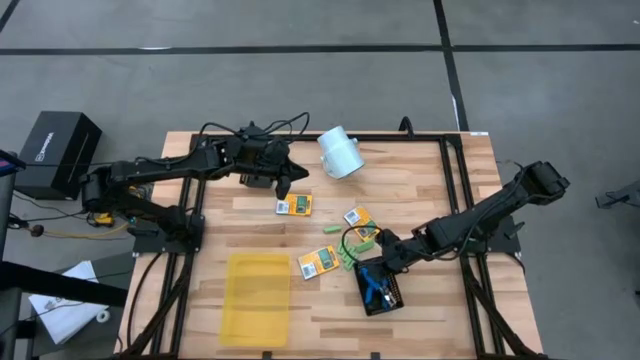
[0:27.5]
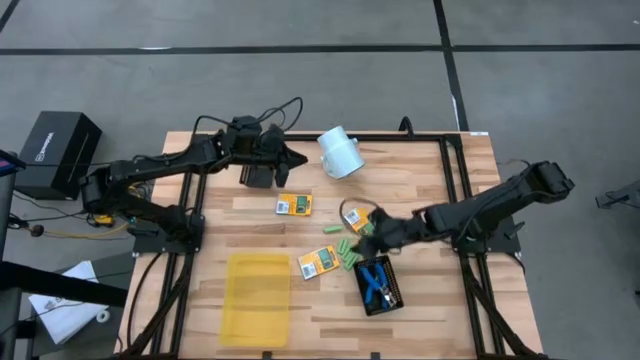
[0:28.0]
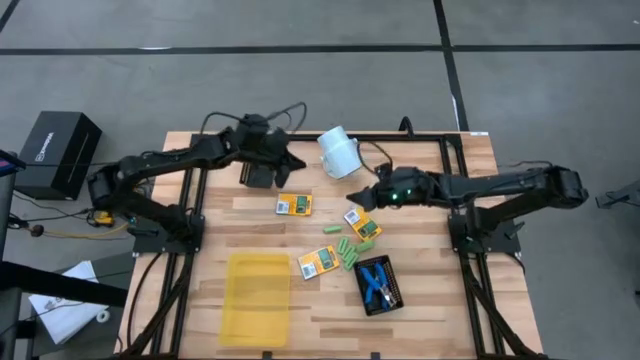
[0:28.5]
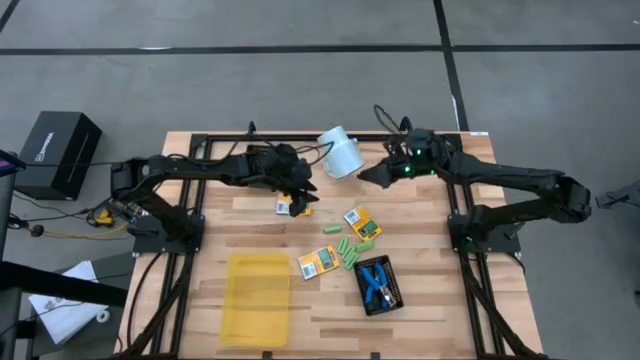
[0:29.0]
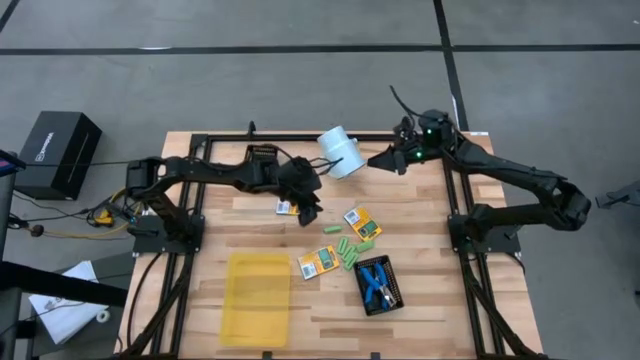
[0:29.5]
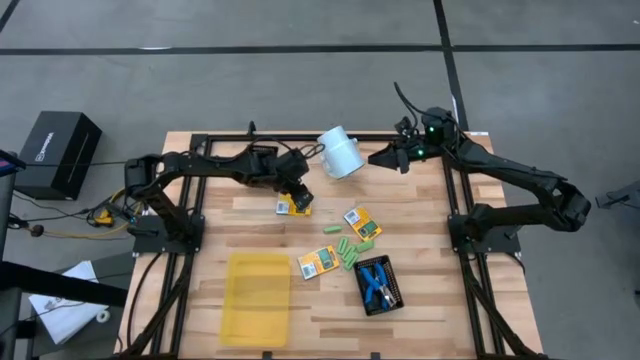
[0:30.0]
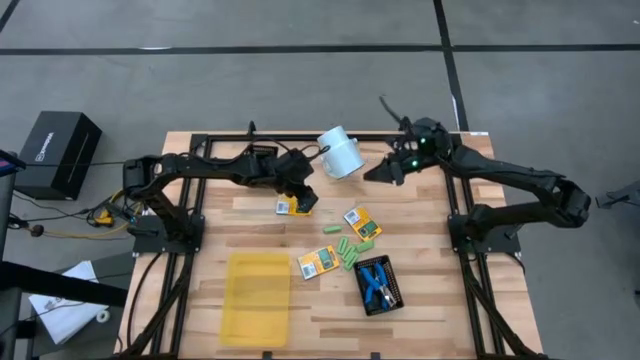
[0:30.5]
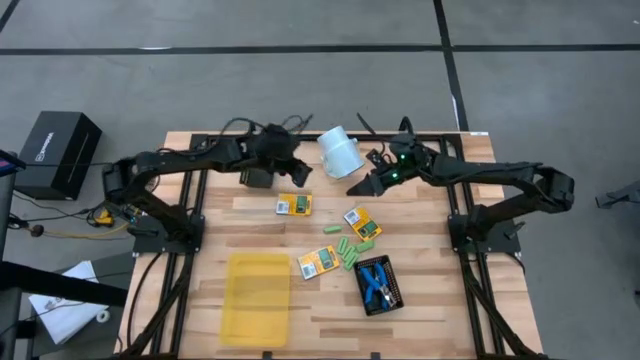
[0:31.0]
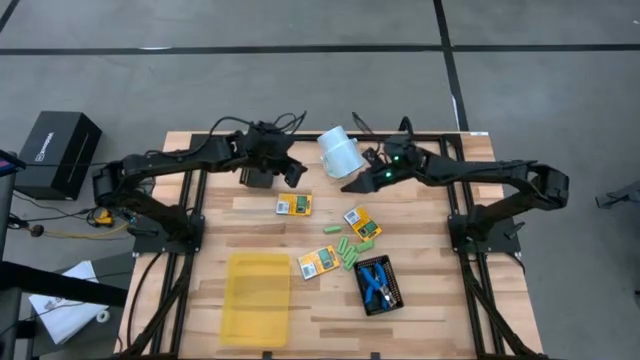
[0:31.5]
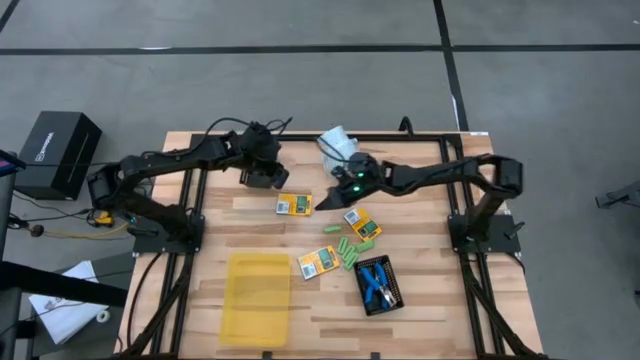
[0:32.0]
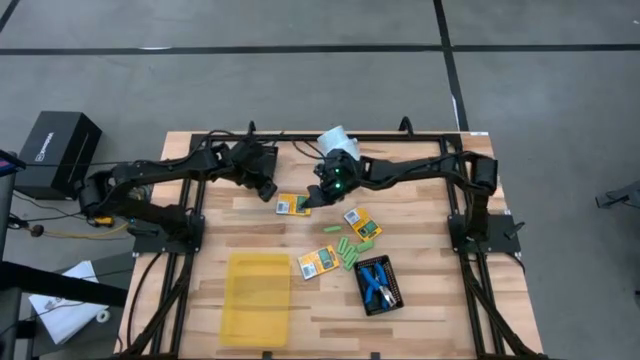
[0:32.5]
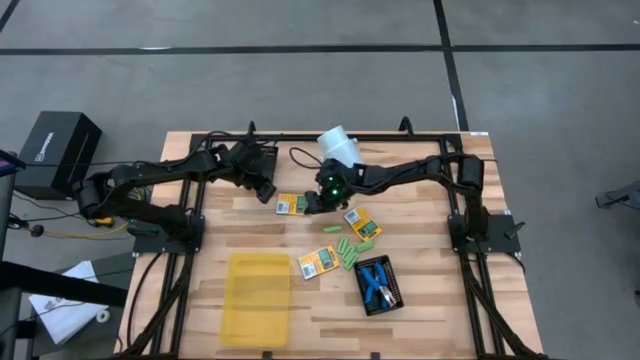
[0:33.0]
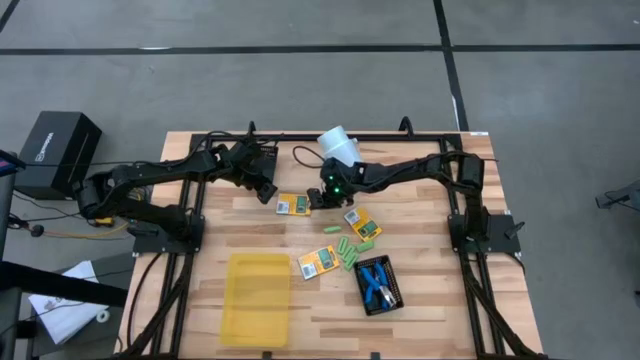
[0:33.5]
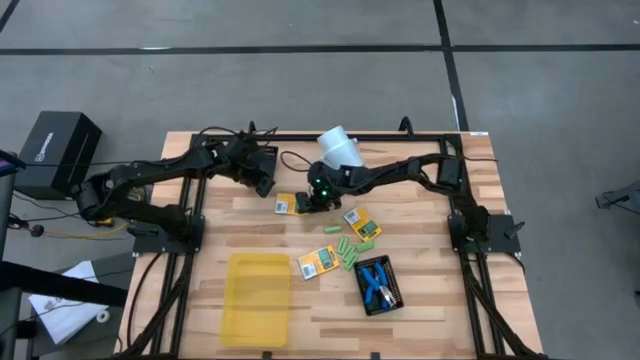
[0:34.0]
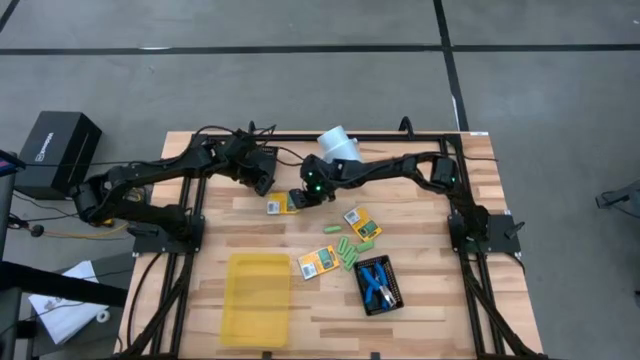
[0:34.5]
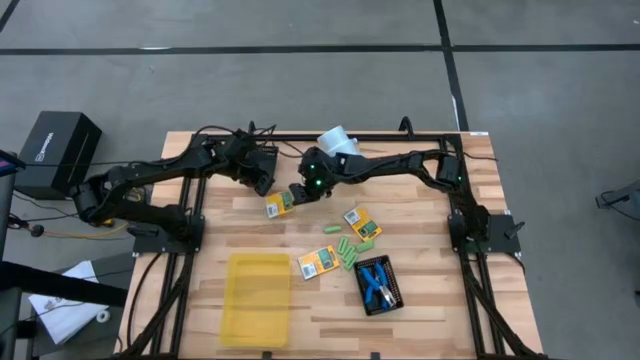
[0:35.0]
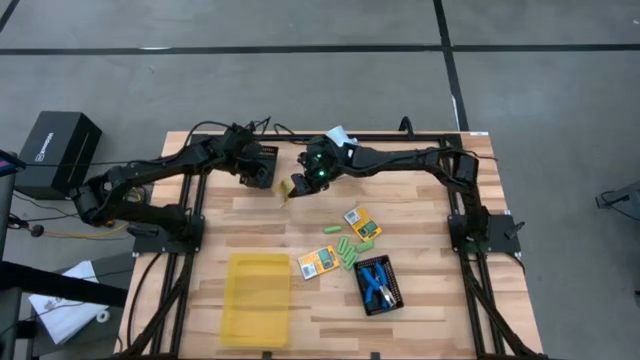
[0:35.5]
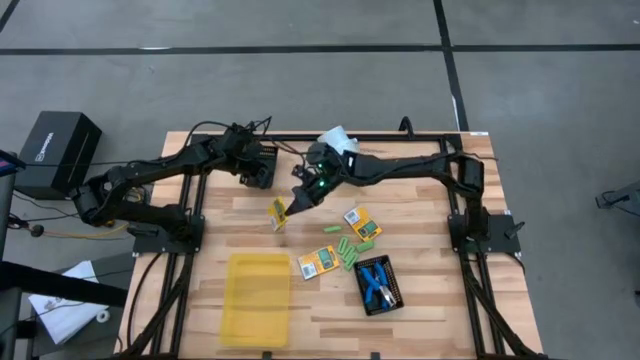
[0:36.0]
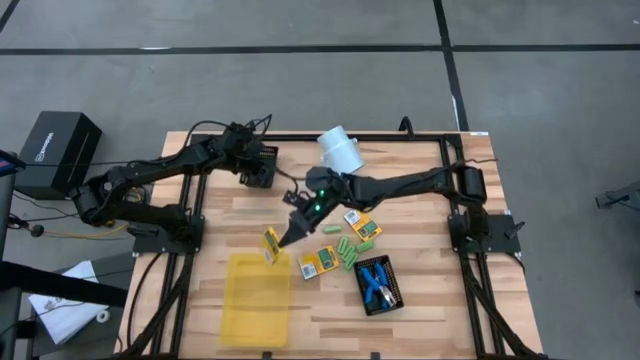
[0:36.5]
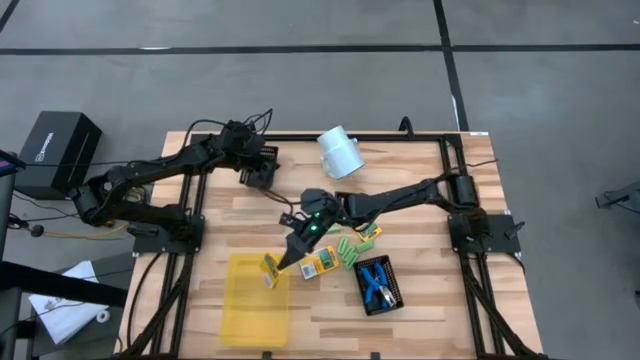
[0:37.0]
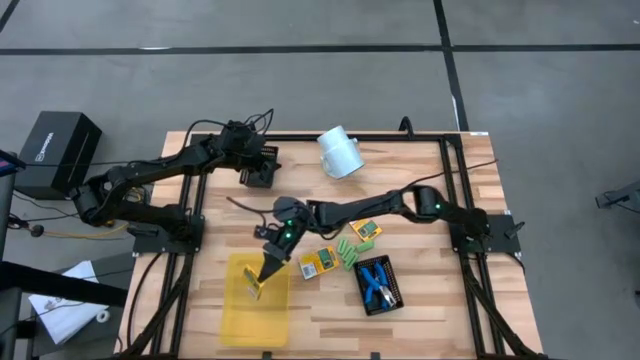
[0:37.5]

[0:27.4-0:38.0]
Task: Pick & Place School Supplies
Put the yellow crayon box into the yellow bin

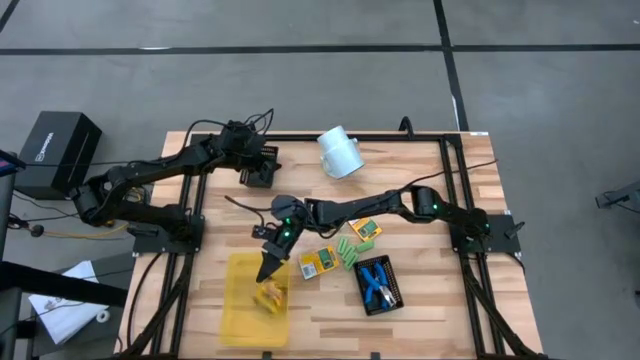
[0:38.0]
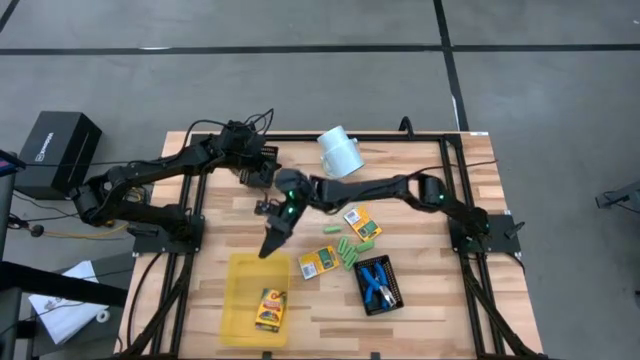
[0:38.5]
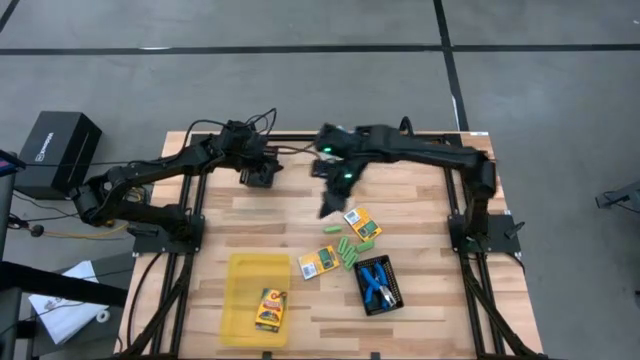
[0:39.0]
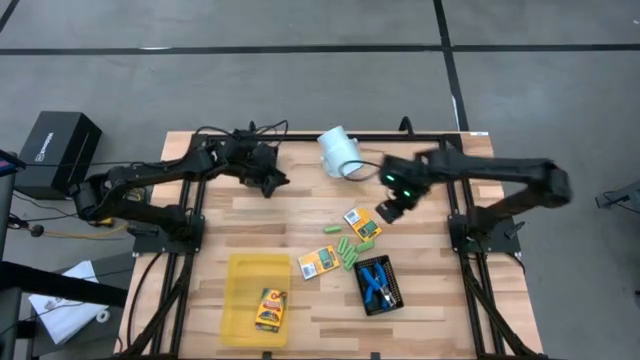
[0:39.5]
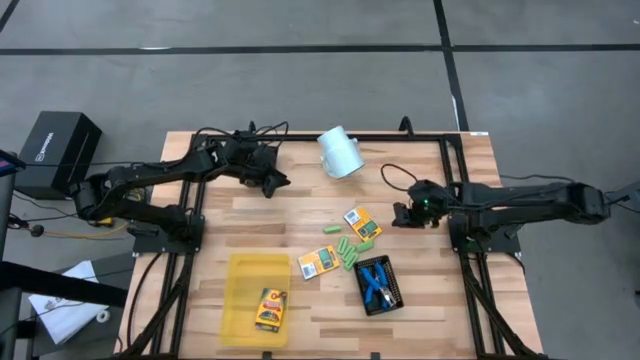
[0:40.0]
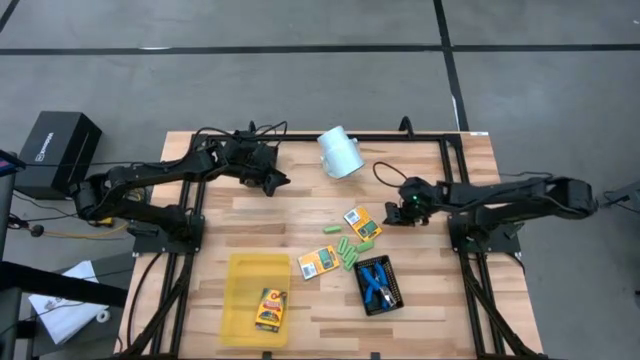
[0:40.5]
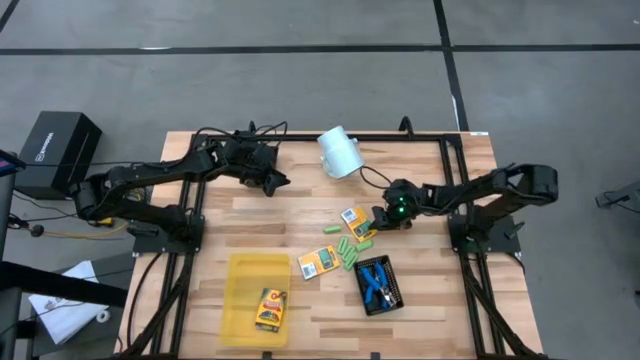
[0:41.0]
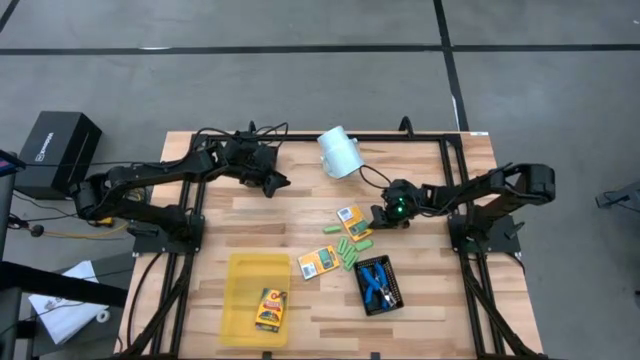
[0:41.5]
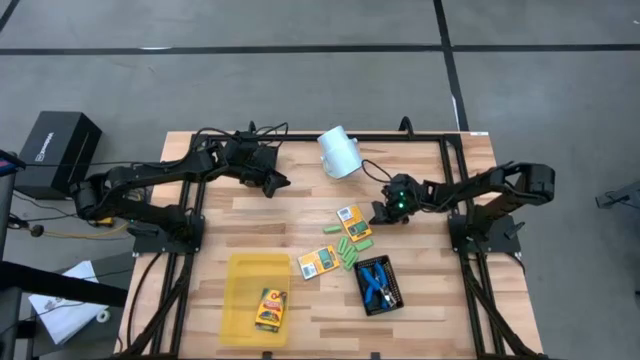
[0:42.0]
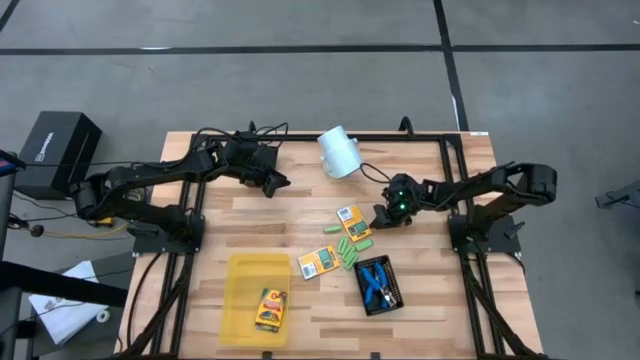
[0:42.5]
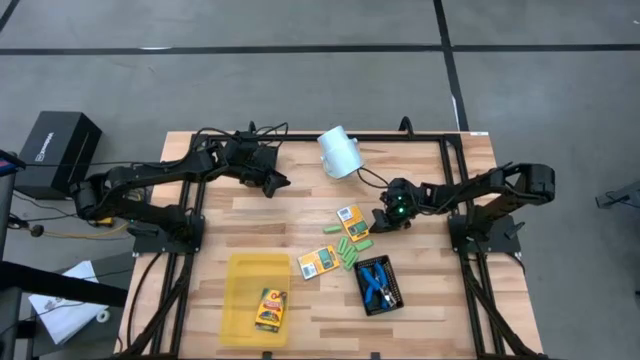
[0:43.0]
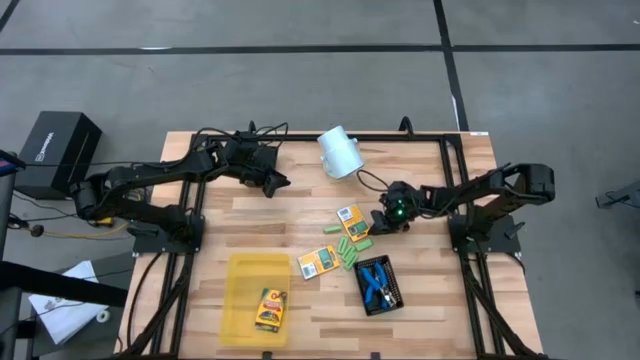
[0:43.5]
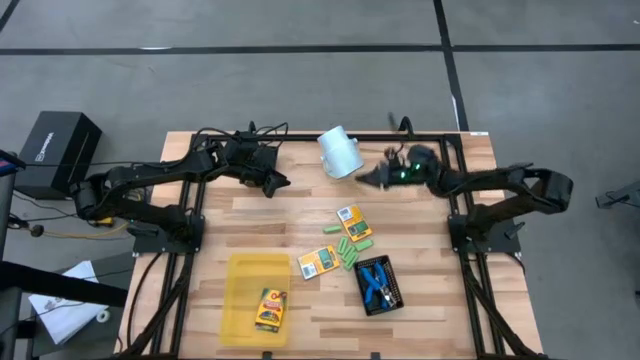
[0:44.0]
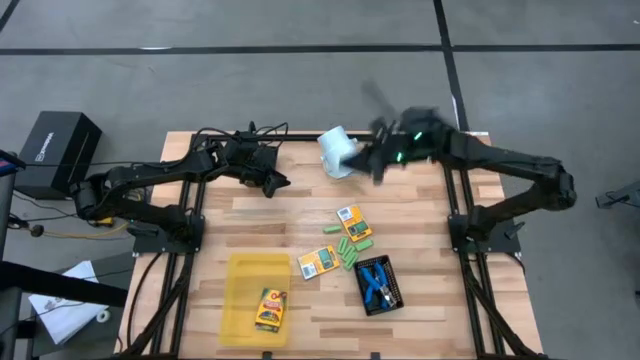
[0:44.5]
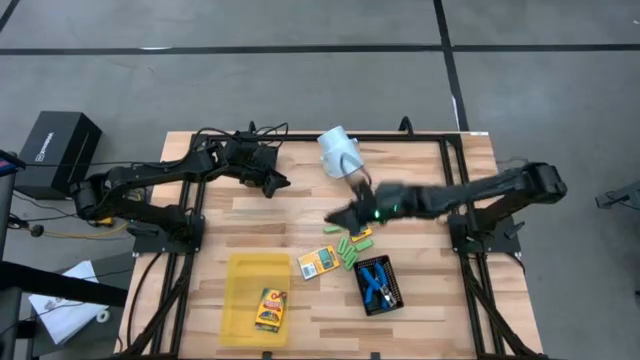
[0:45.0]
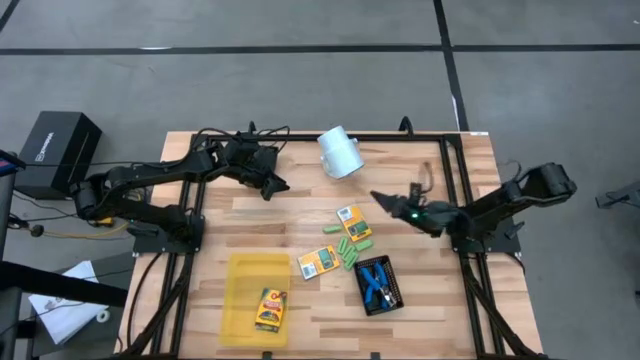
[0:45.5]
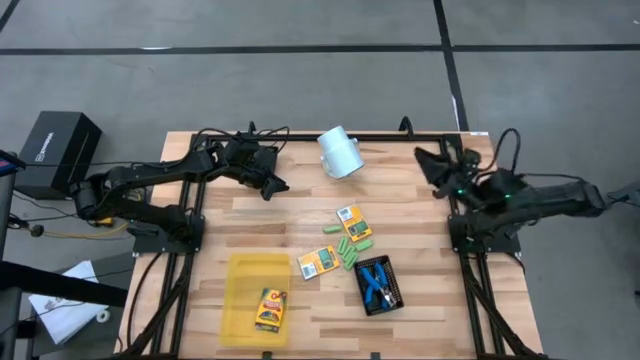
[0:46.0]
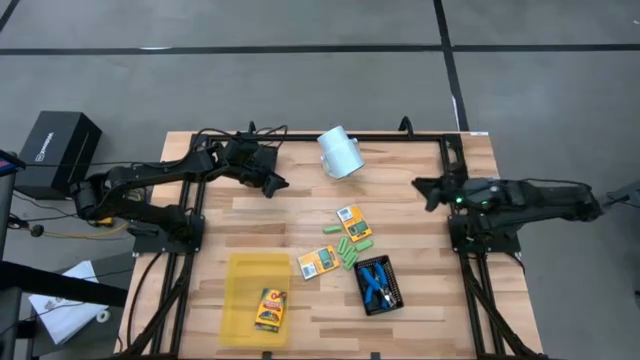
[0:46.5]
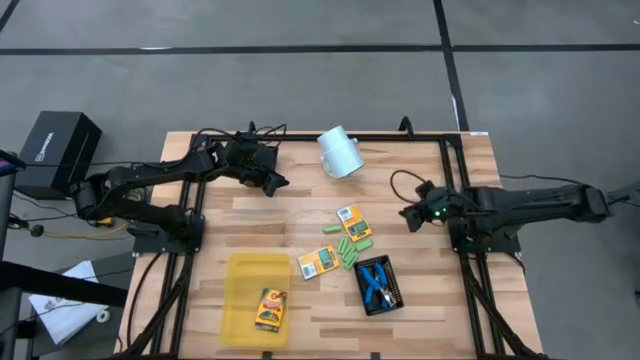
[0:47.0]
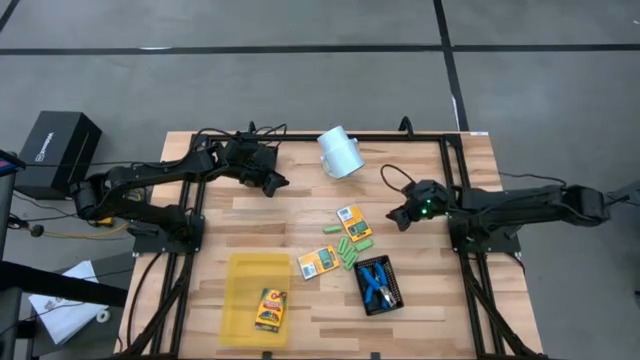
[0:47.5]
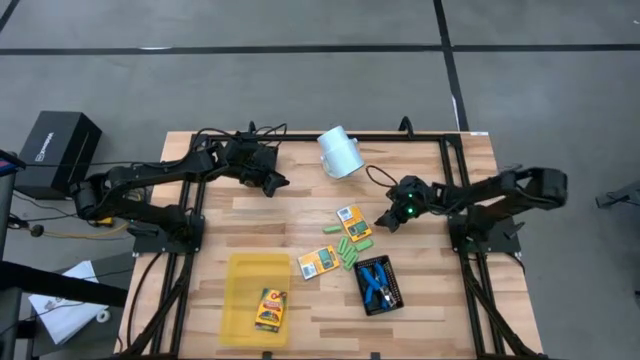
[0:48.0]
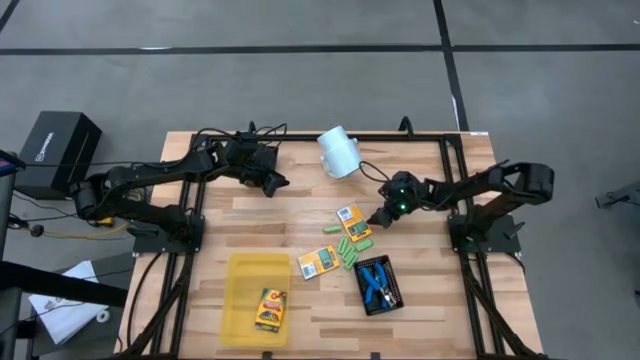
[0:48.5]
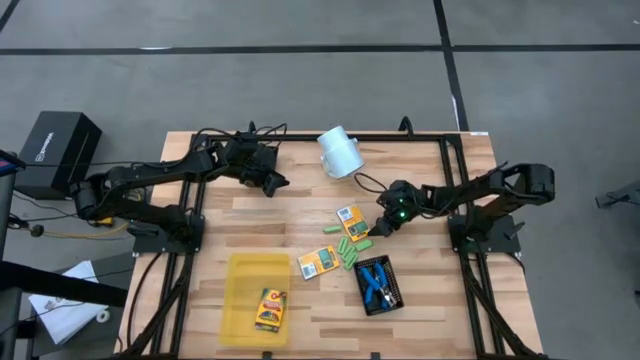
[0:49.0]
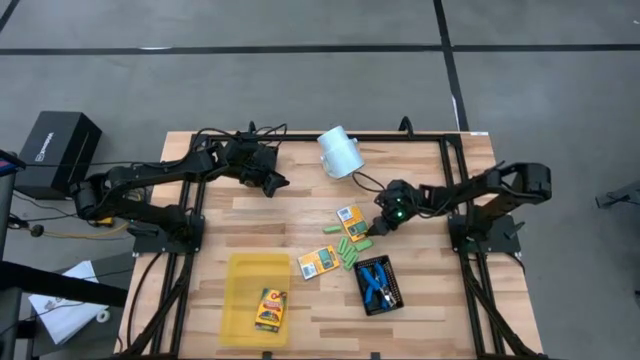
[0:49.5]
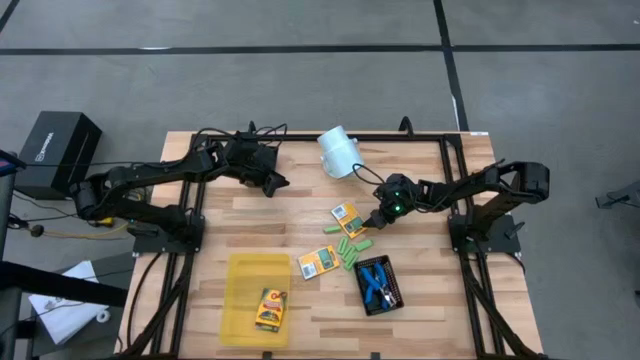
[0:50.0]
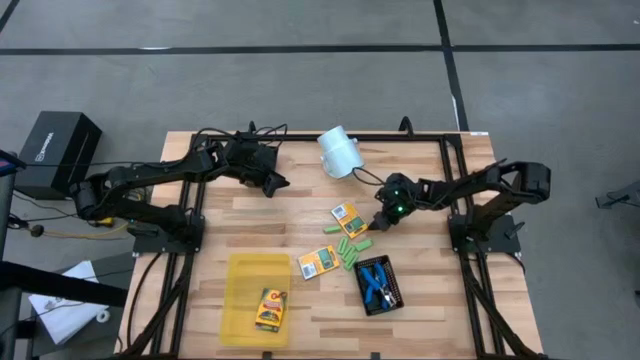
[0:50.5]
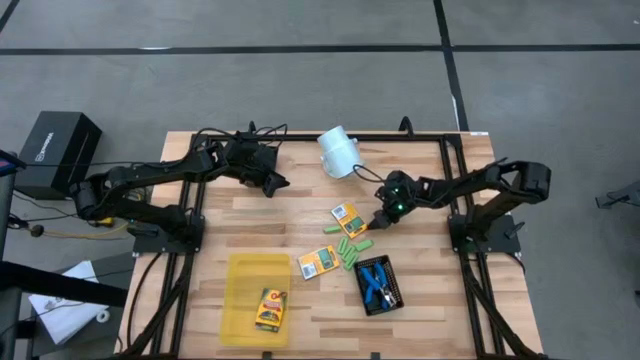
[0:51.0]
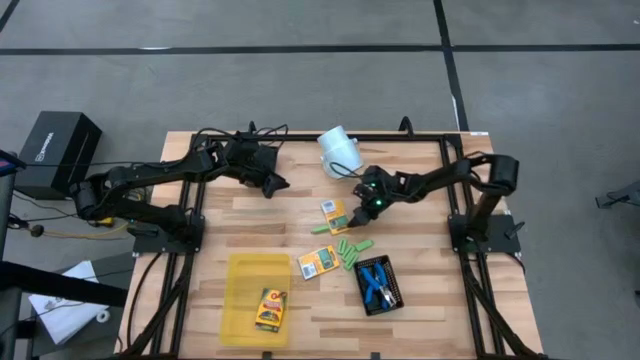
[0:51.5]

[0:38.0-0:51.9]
Put the yellow crayon box into the yellow bin
